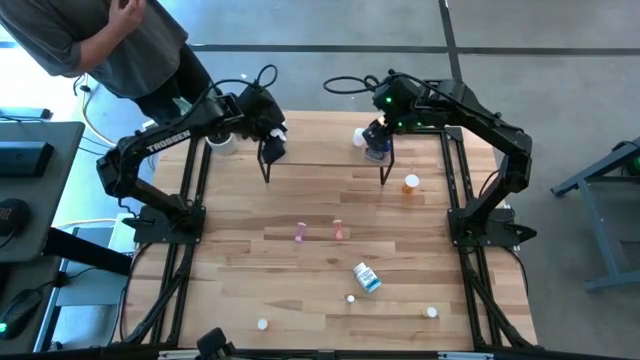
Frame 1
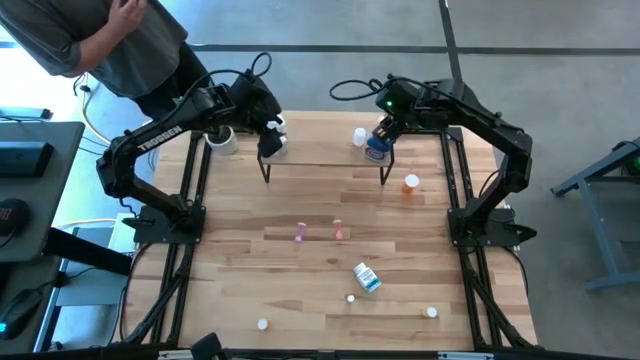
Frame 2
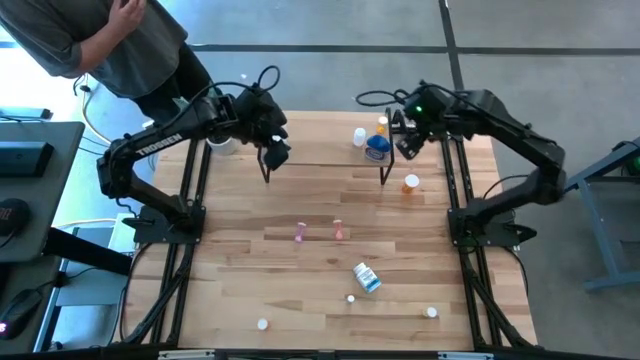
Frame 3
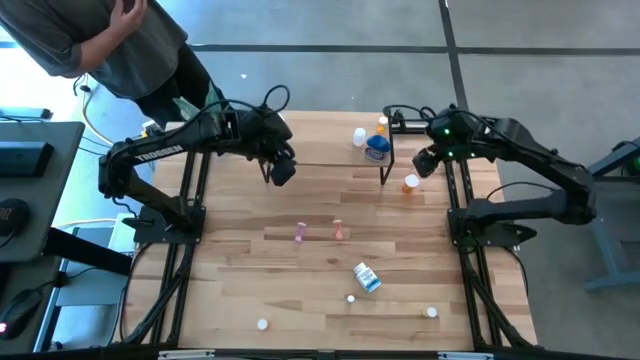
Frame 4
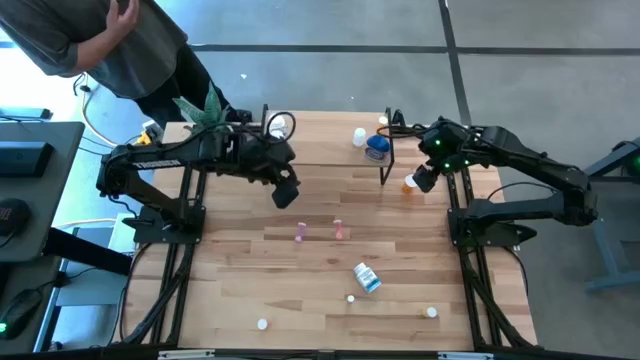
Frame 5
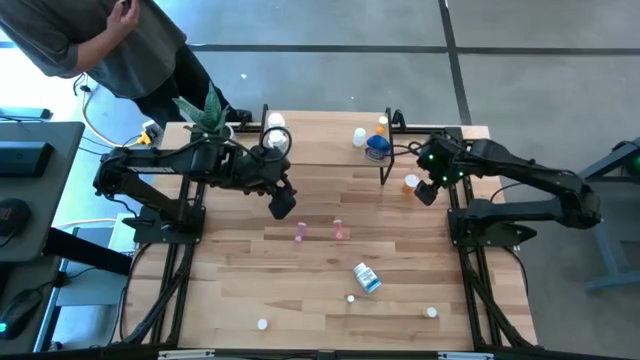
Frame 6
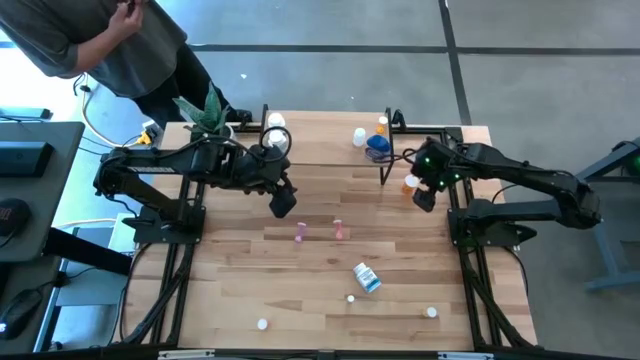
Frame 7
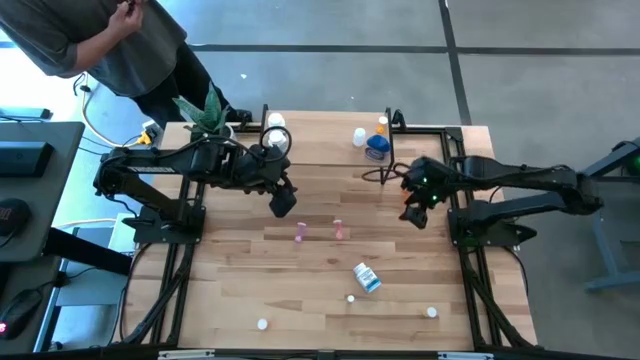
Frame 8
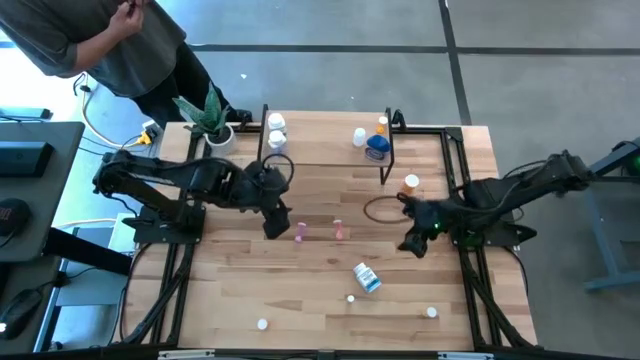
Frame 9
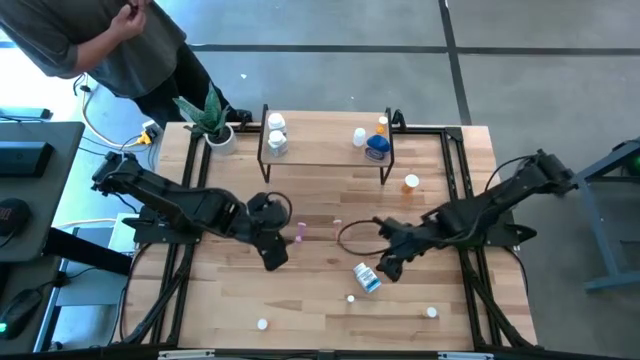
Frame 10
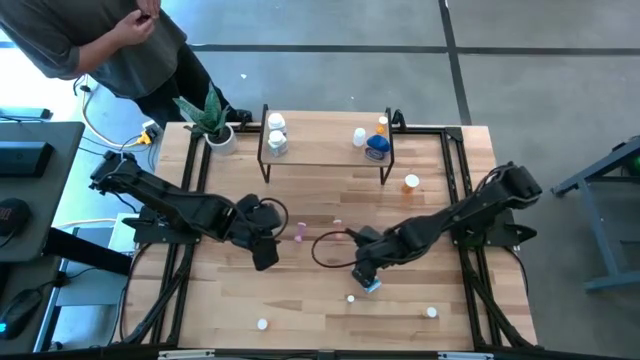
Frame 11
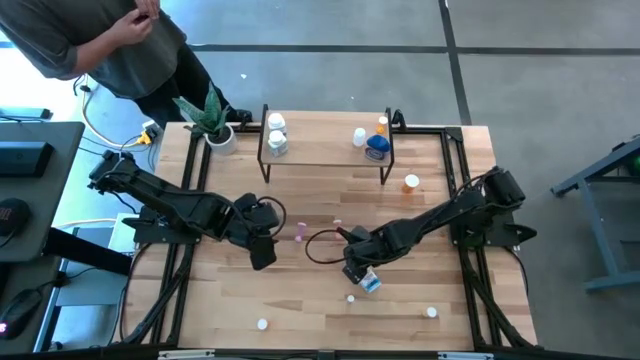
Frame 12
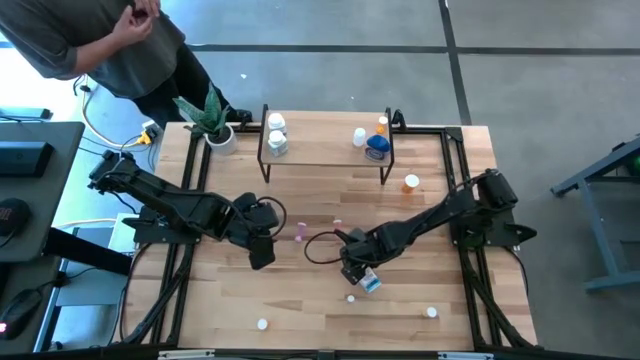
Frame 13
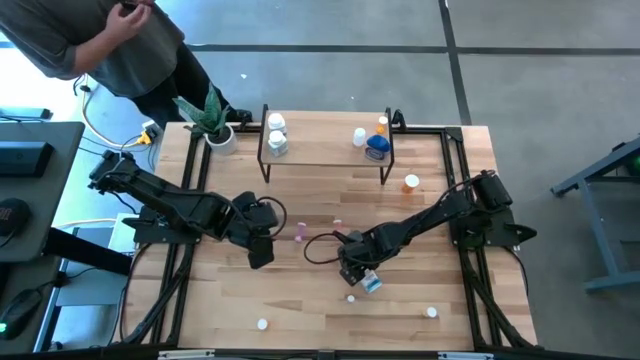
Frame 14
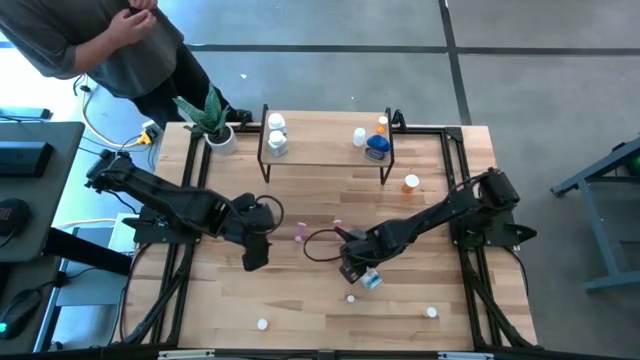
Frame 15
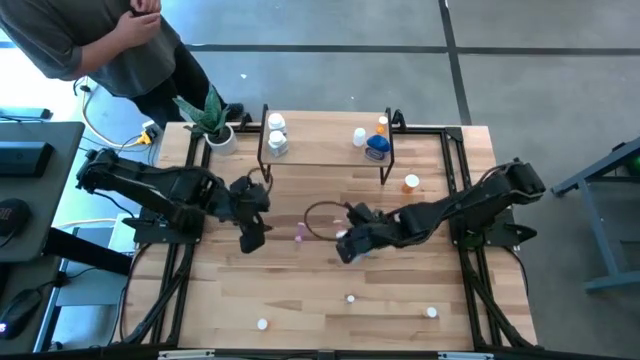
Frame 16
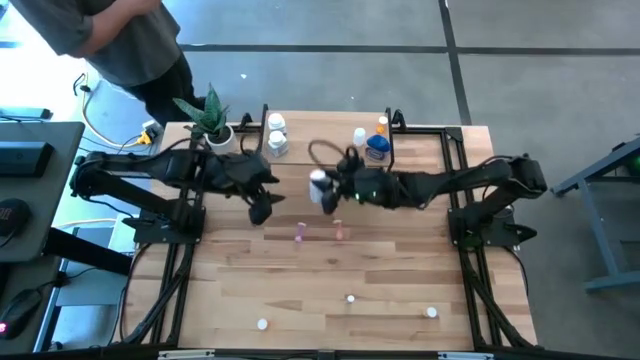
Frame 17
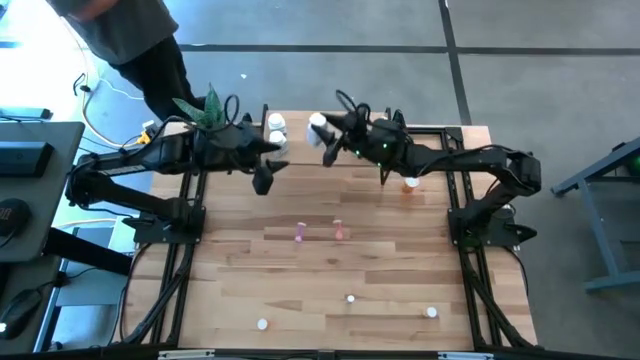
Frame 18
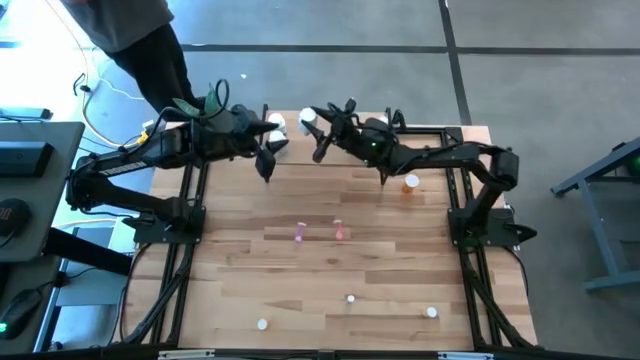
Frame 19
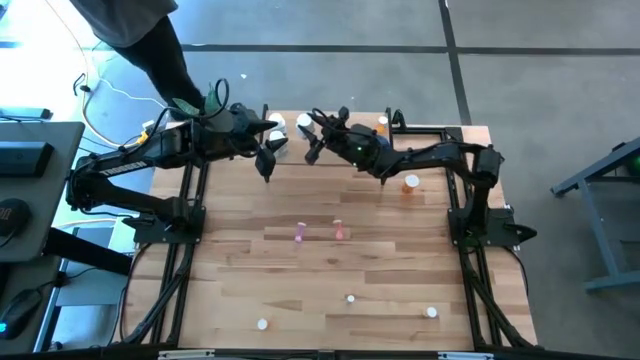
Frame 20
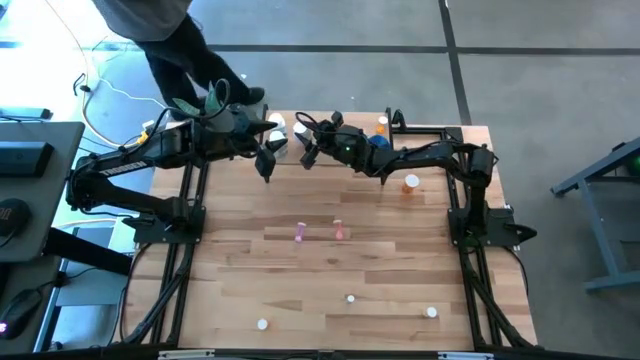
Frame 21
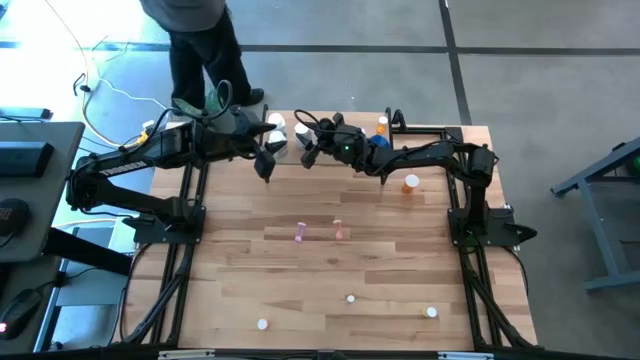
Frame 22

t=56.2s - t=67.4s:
Task: Pick and place medicine bottles onto shelf by color
Put the white pill bottle on the shelf

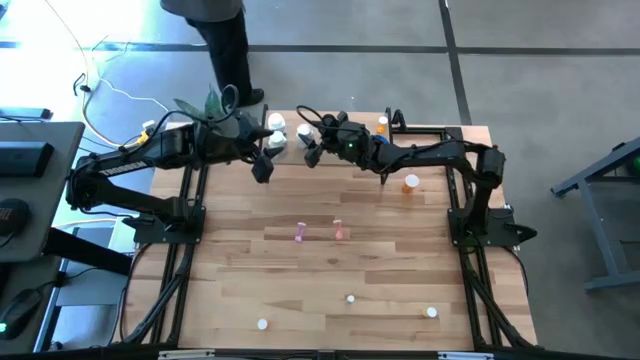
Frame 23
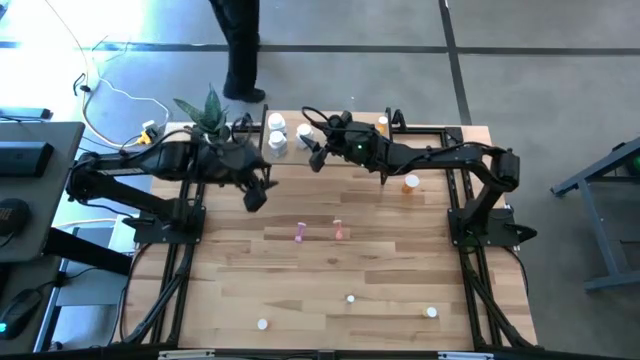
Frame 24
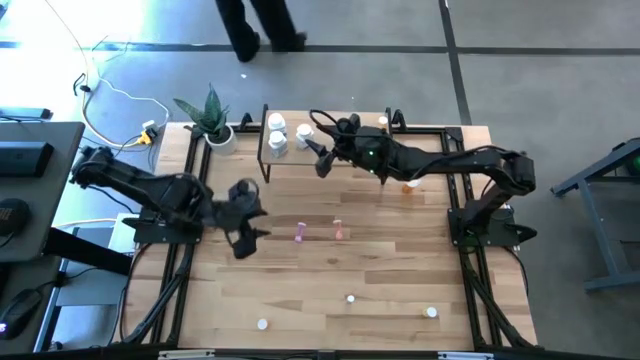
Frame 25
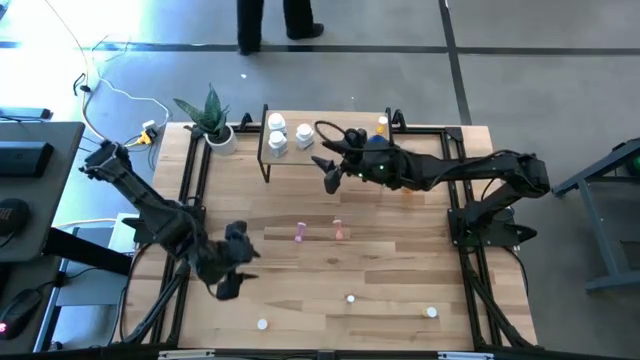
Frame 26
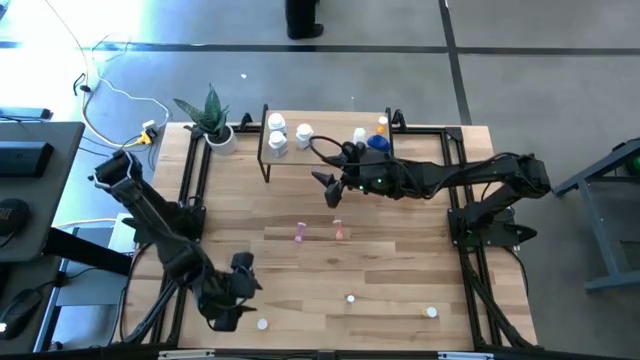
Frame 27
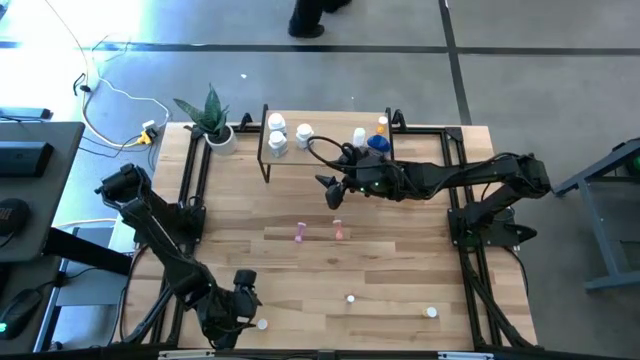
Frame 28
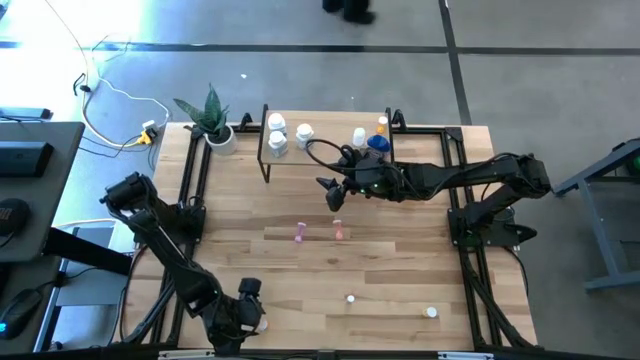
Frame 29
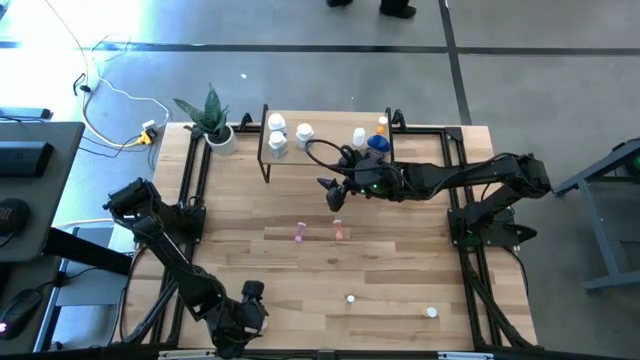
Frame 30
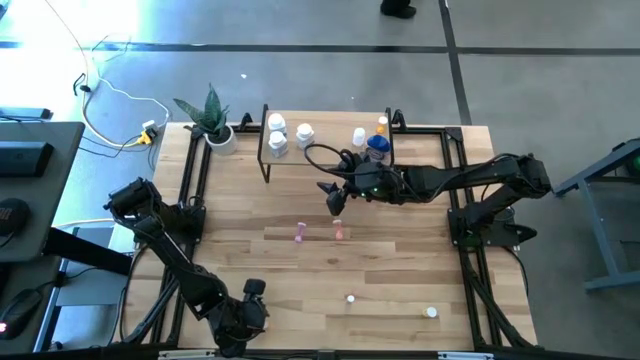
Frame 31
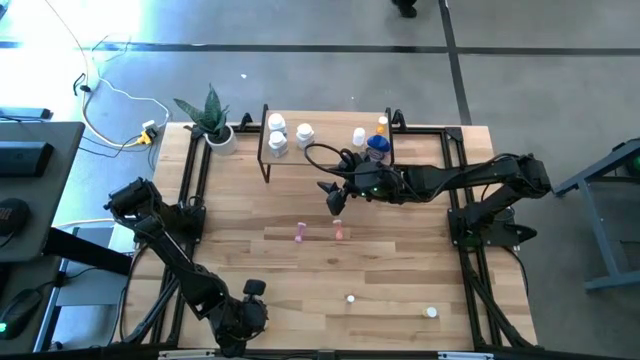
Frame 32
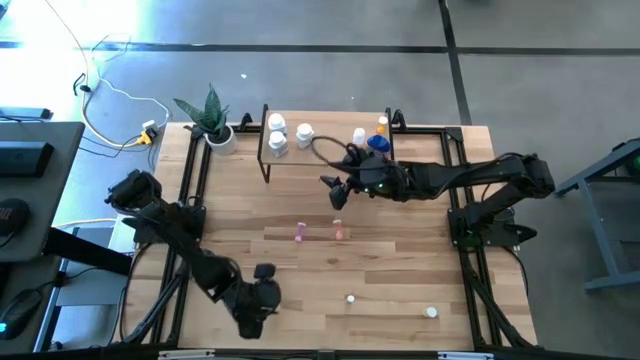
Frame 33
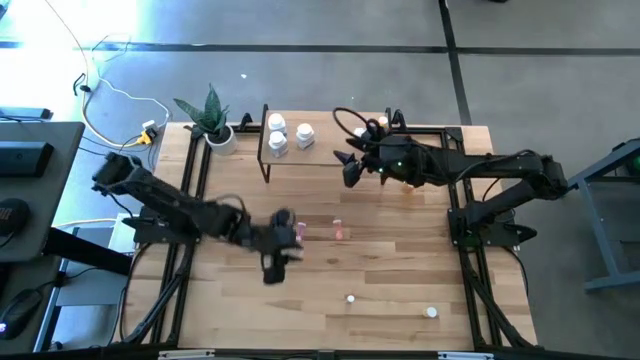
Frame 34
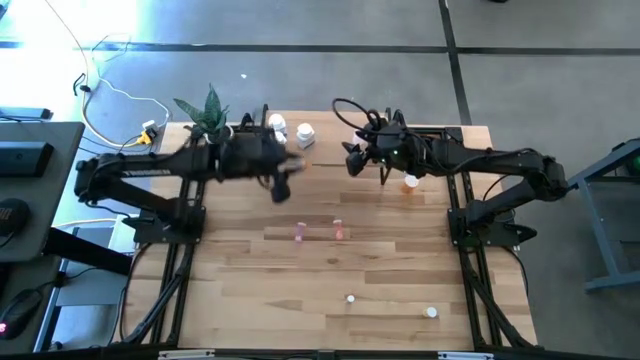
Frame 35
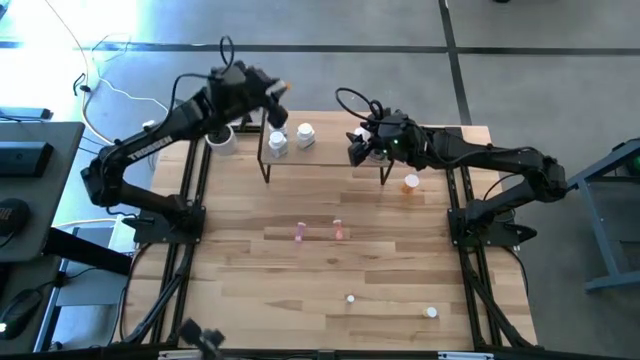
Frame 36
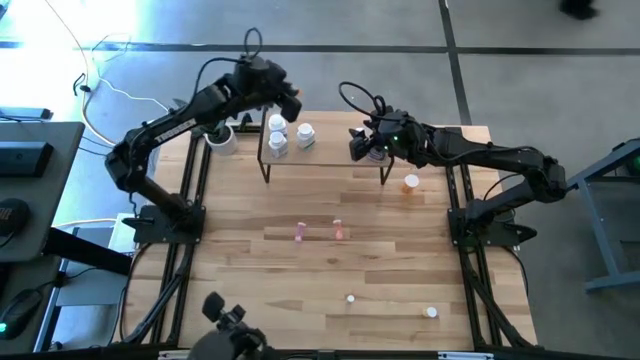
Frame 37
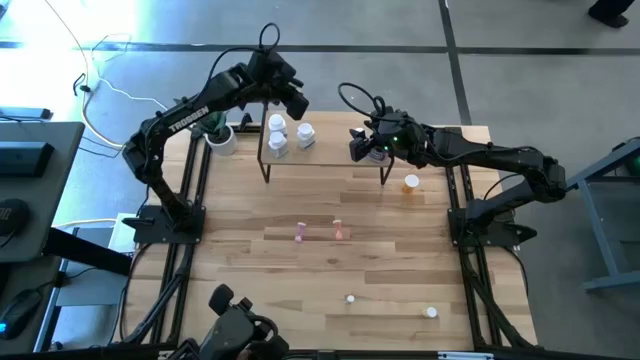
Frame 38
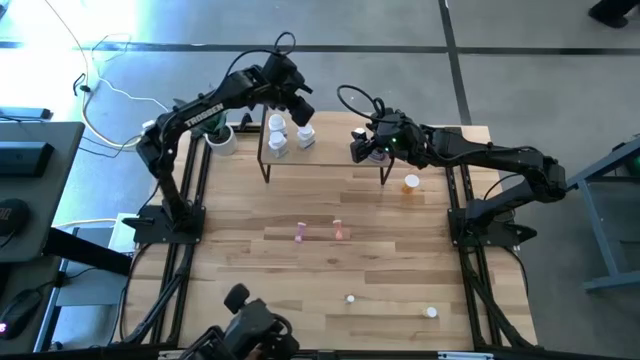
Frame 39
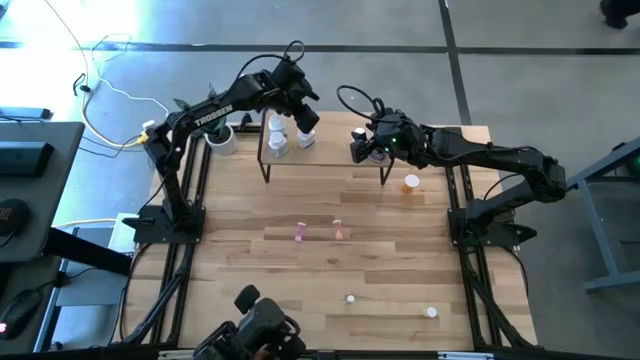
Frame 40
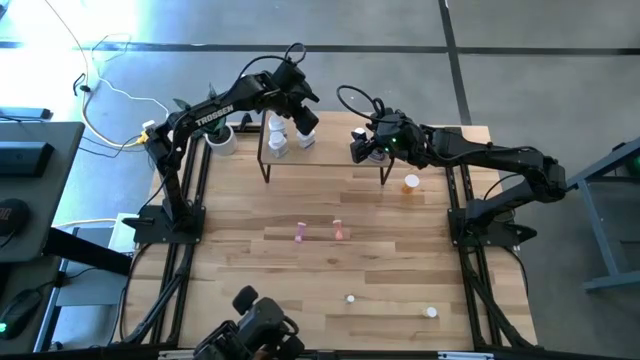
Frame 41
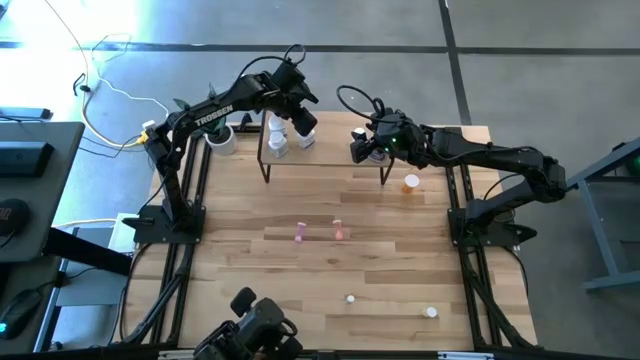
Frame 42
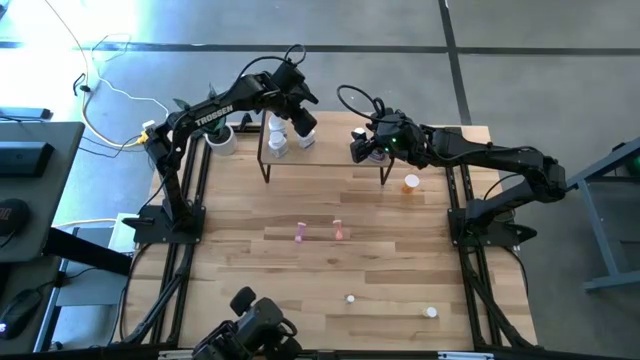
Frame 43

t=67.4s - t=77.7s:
Put the bottom orange pill bottle on the shelf
